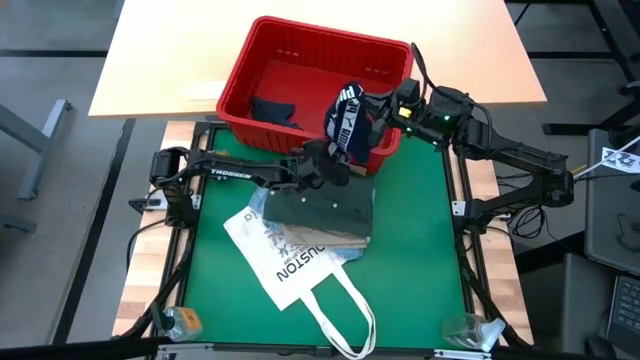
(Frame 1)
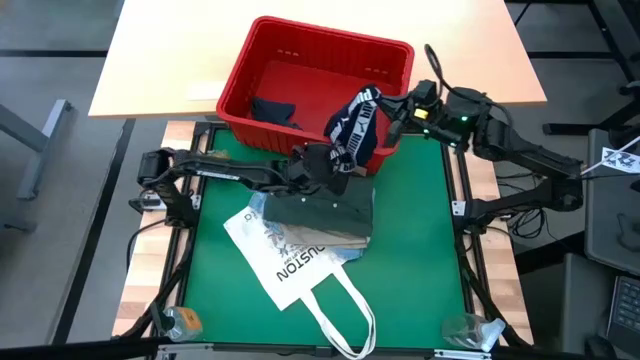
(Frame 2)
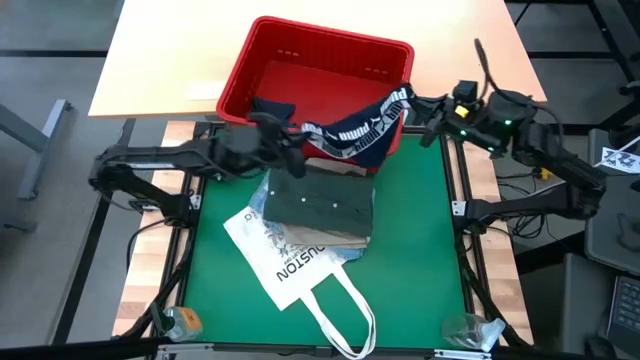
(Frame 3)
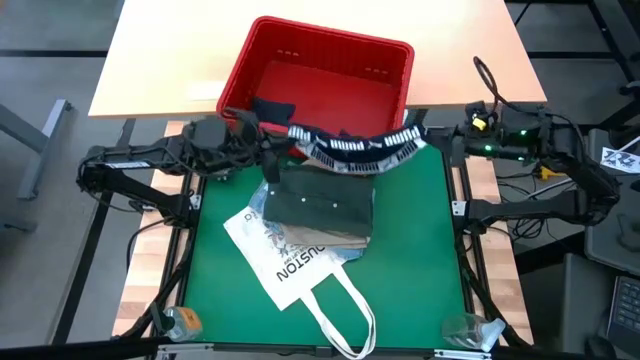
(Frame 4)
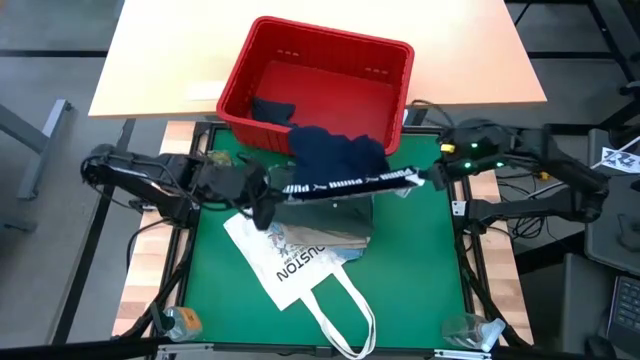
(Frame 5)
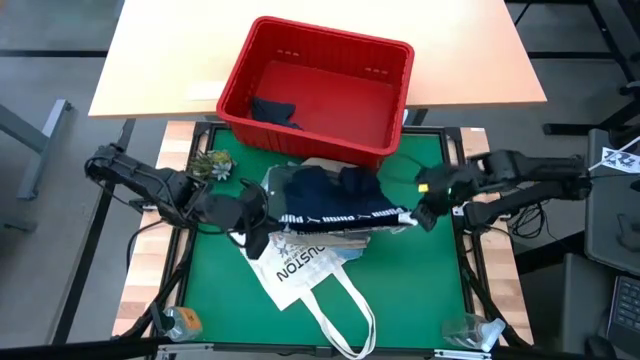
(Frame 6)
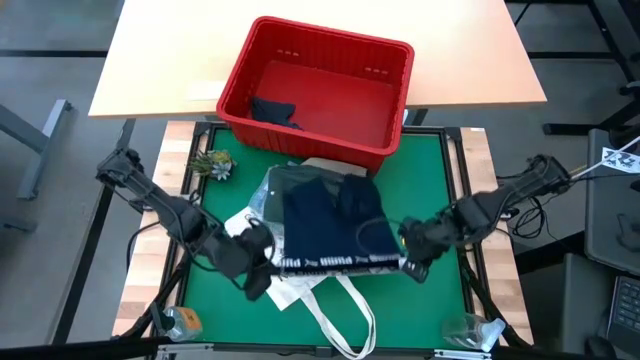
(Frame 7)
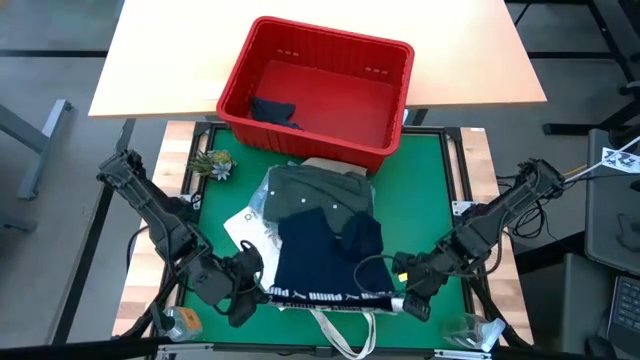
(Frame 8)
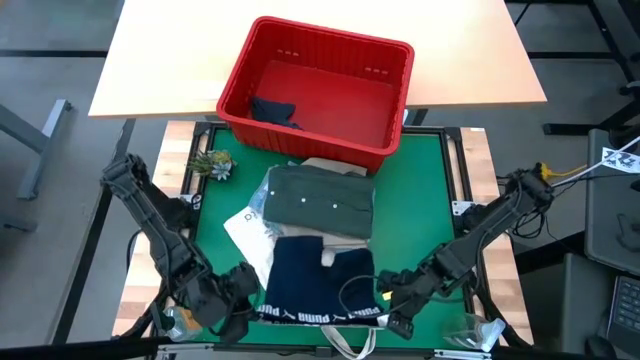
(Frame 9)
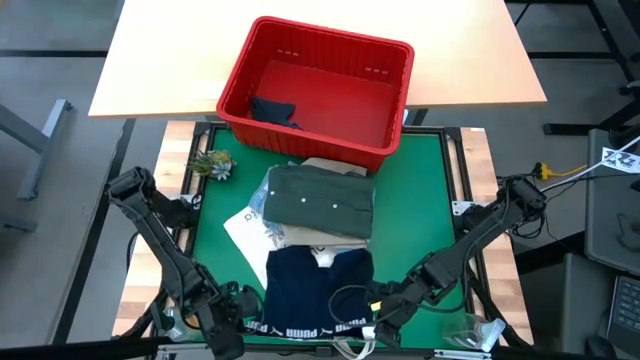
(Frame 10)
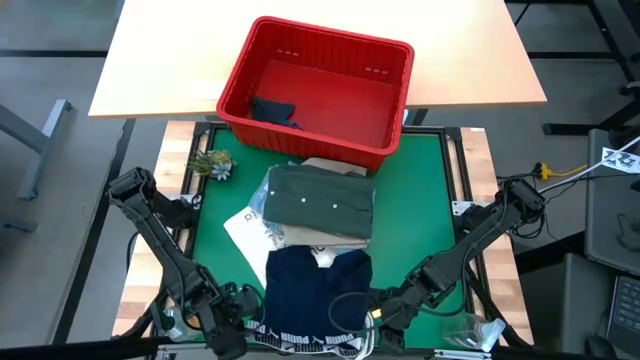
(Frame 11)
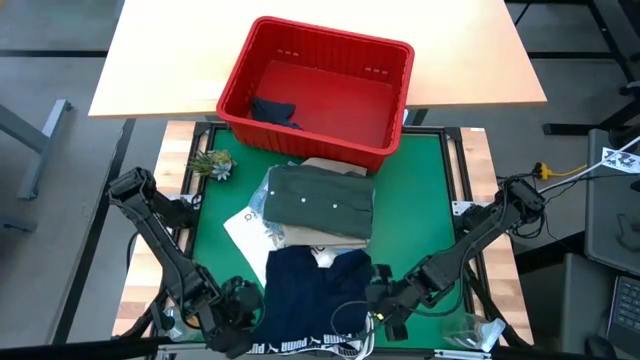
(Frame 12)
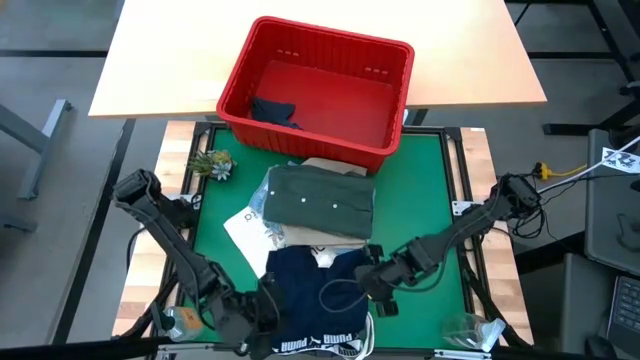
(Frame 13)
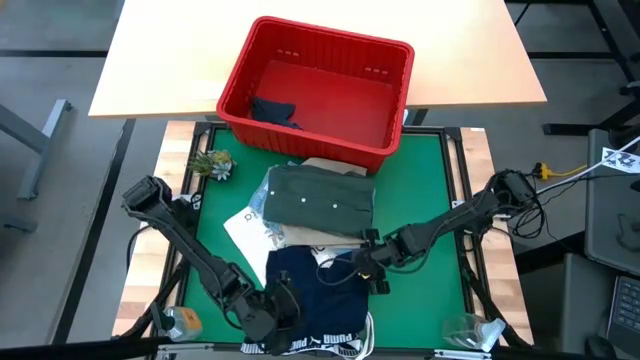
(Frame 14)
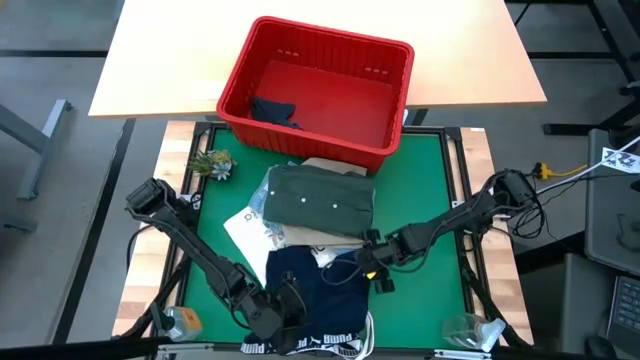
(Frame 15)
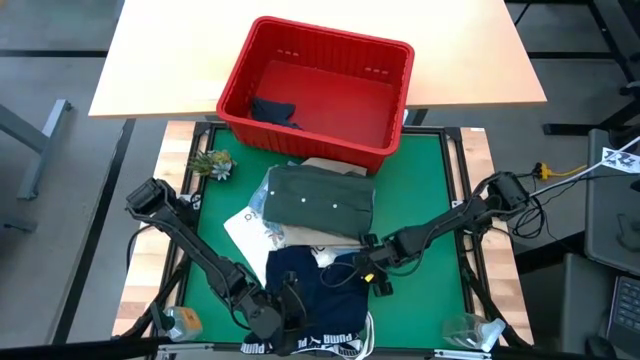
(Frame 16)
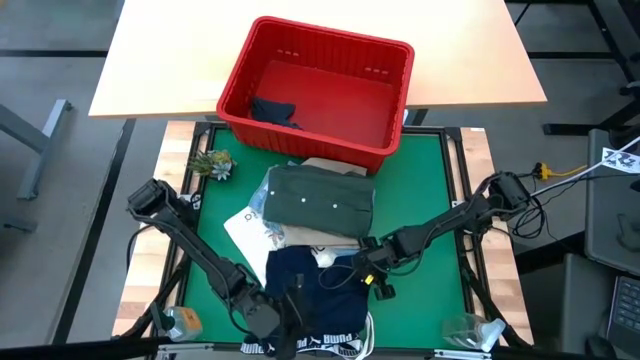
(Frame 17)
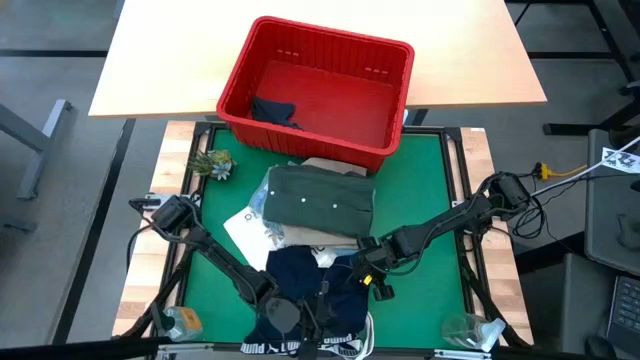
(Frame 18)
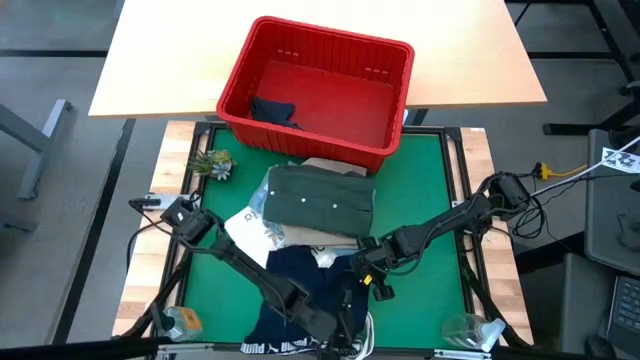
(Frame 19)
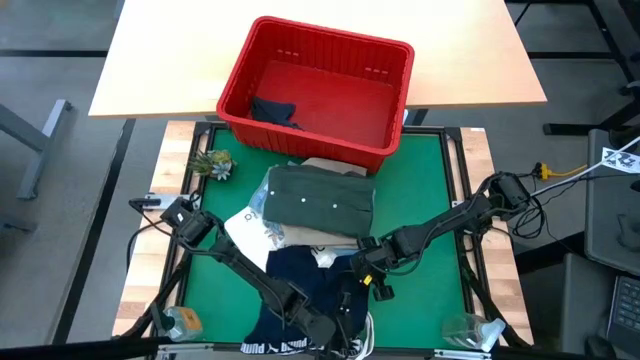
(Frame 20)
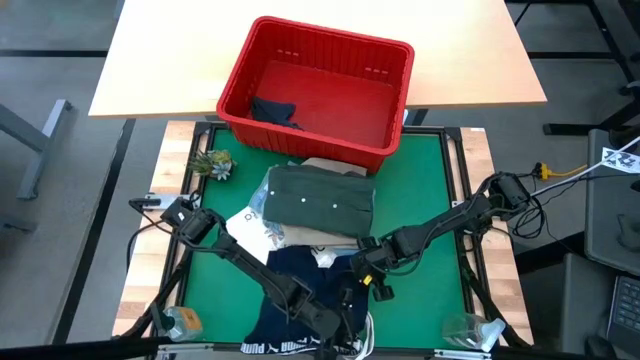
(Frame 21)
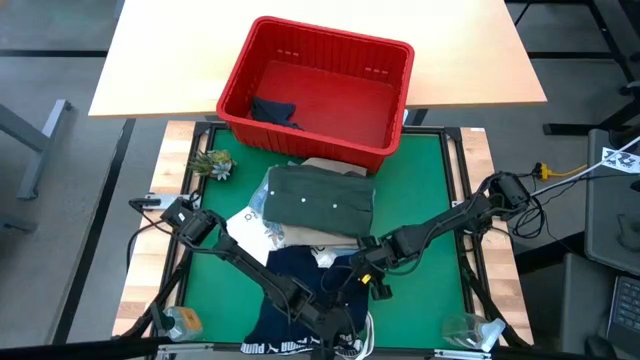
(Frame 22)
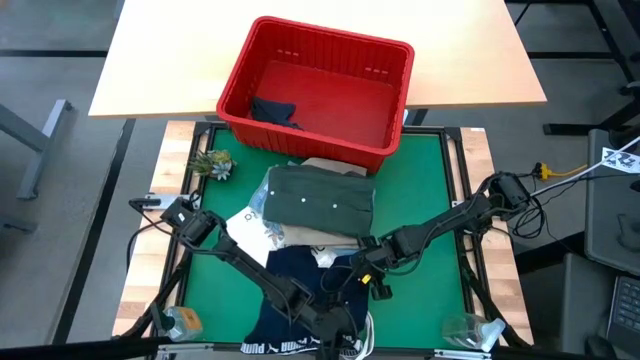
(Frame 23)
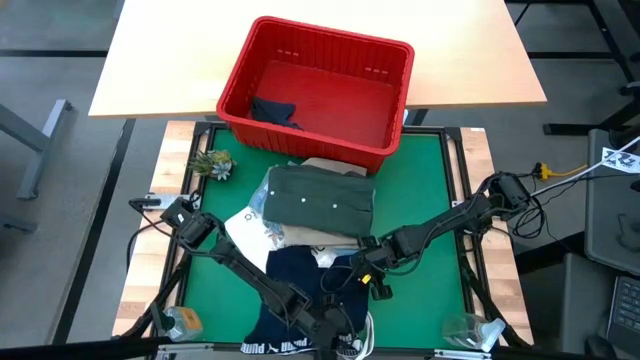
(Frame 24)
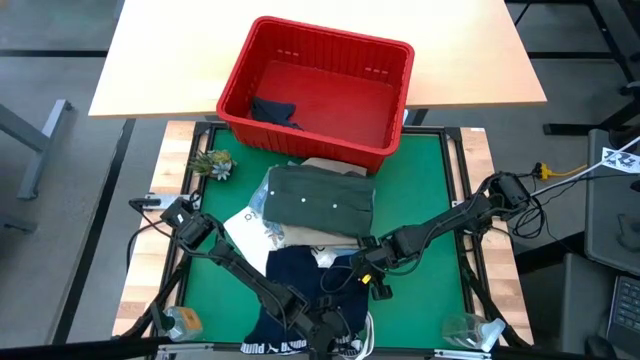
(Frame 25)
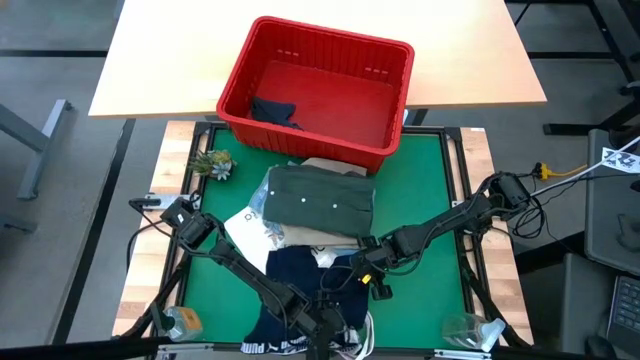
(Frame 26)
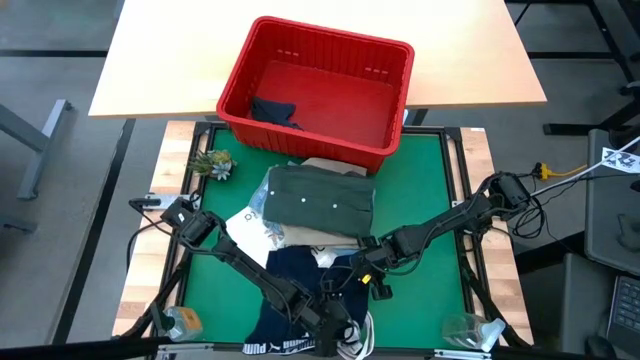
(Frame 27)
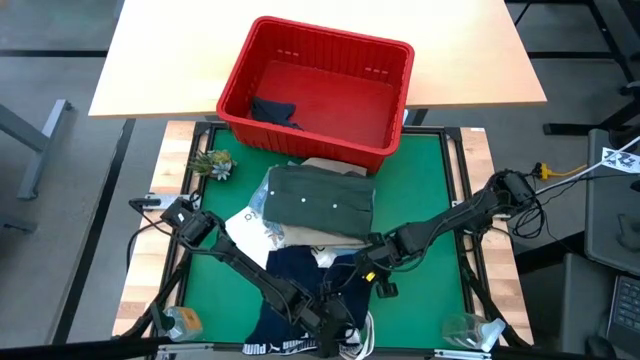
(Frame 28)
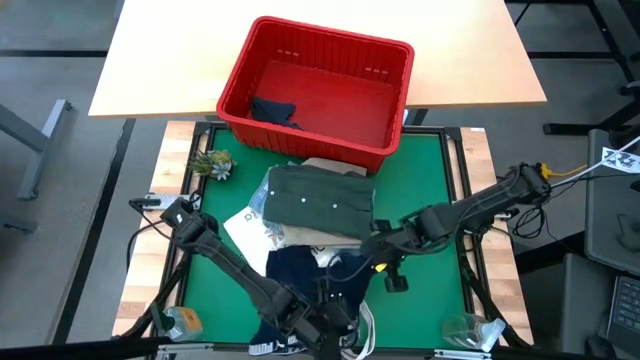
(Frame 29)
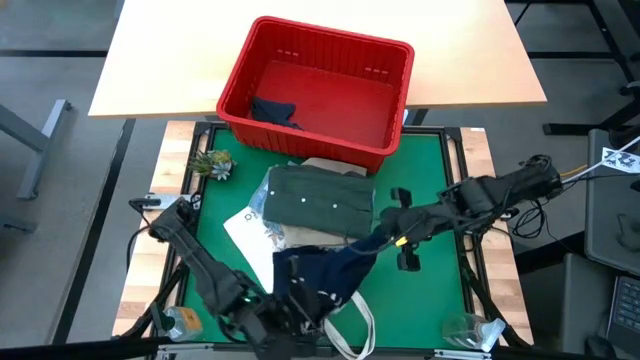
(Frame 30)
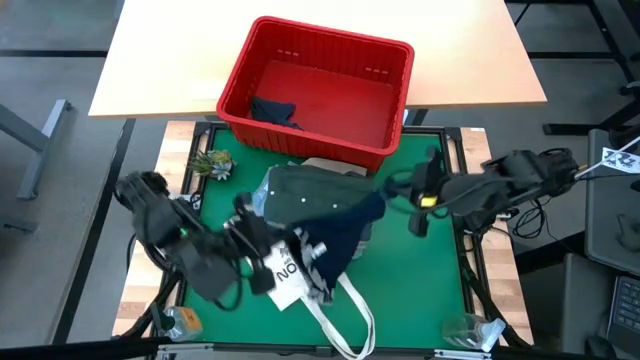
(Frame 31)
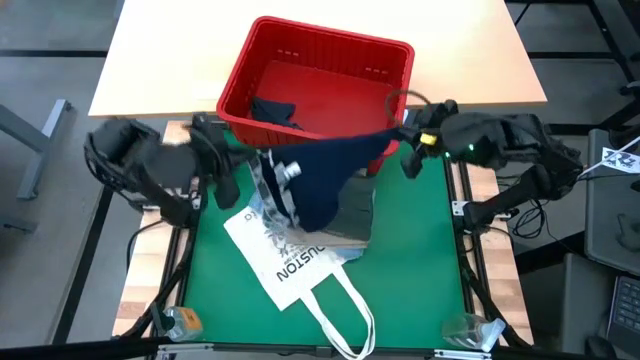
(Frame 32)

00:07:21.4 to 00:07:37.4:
Task: Fold Laundry from Bin
Fold the dark blue boxers
